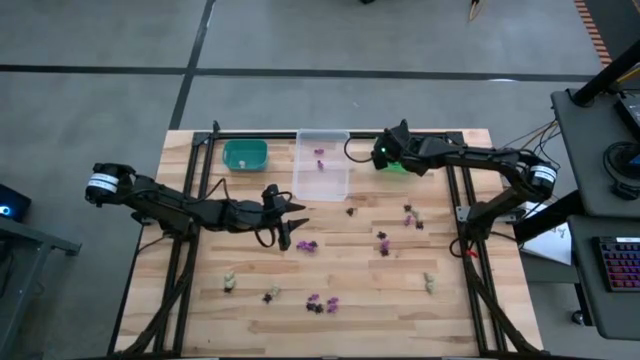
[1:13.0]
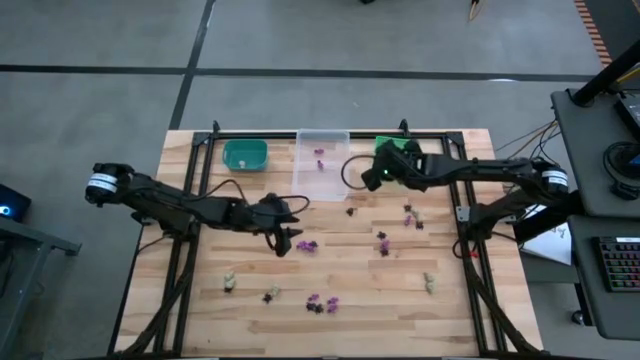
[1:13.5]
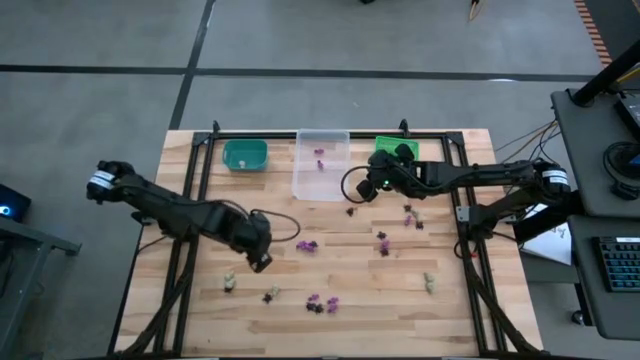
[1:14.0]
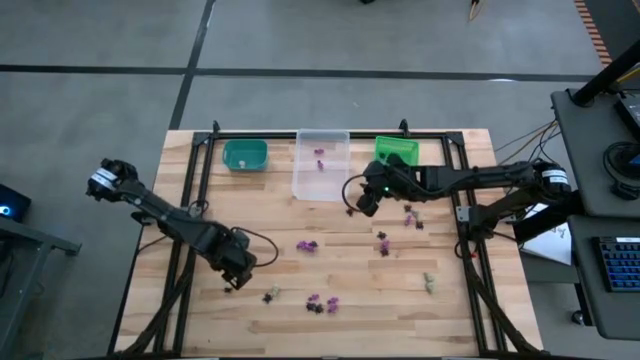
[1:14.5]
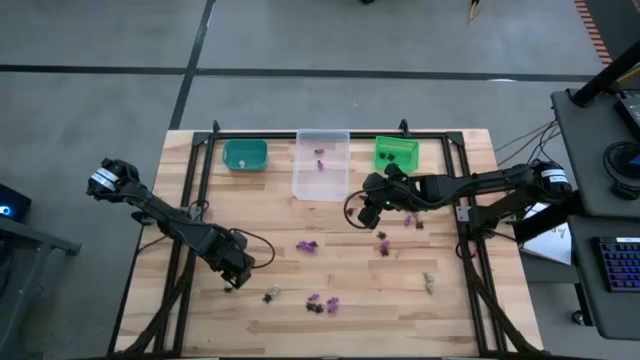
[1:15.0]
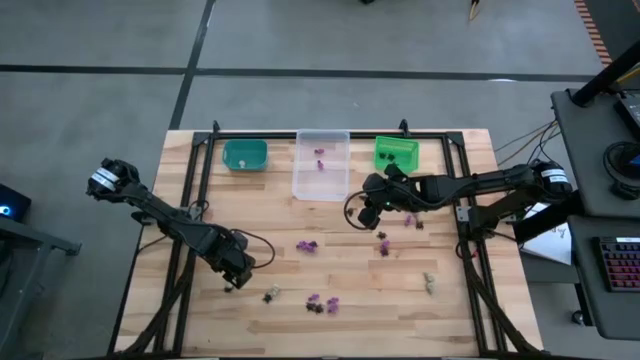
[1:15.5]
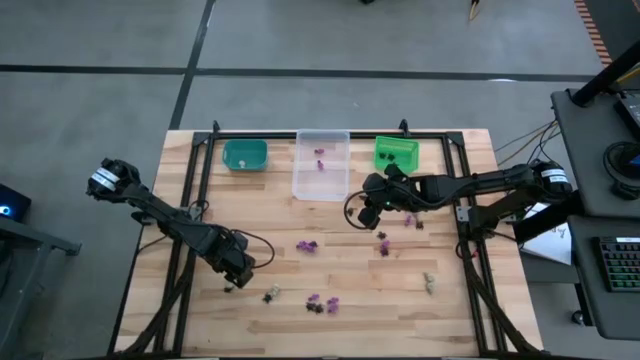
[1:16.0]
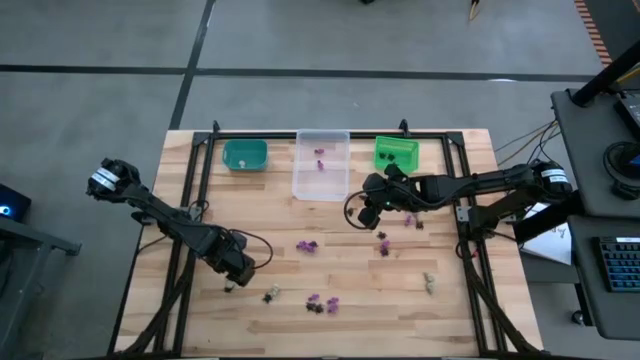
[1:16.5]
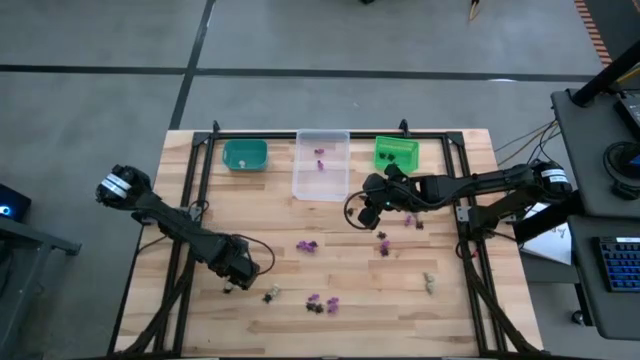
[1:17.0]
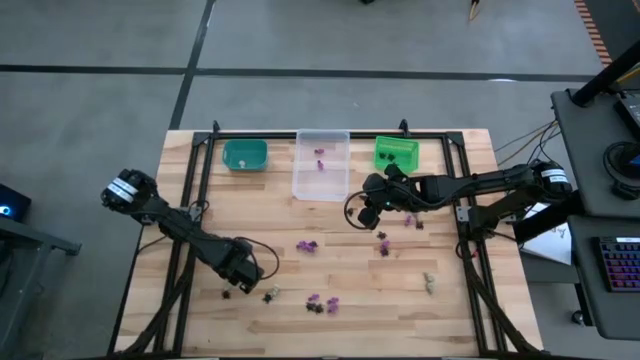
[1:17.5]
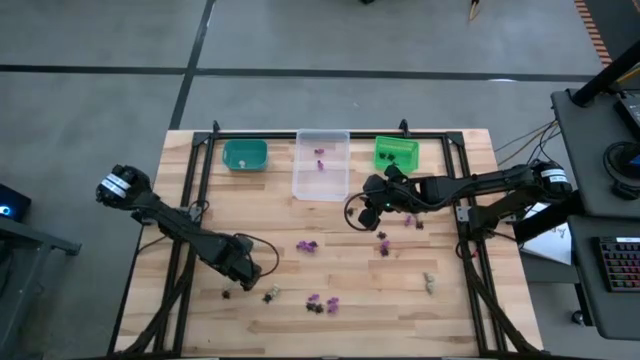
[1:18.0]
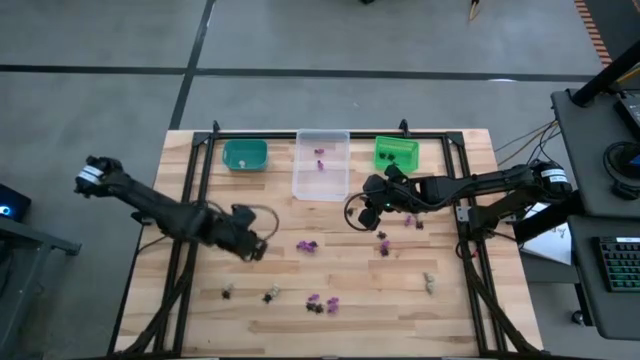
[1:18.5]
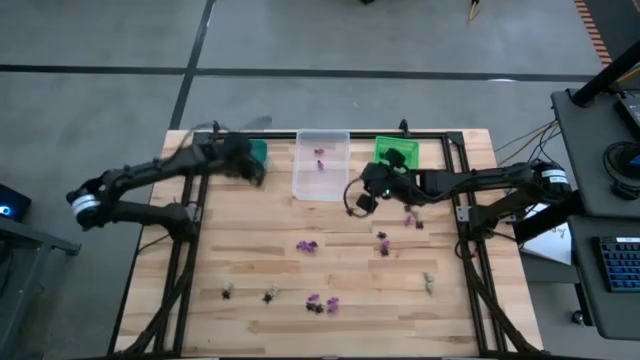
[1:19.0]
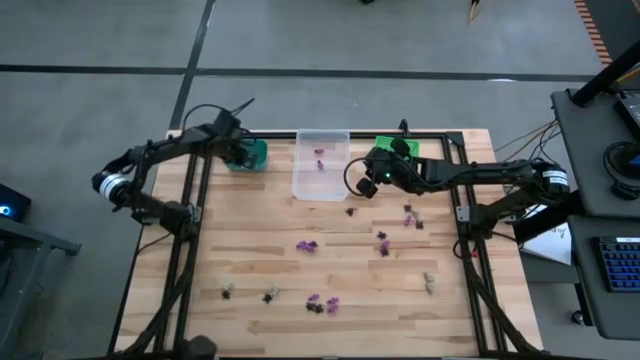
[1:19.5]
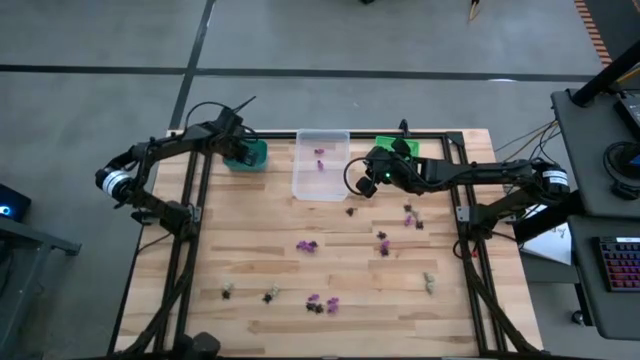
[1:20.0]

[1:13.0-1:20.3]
Task: Sort Halloween decoration
Put the white skull toy into the light blue bin

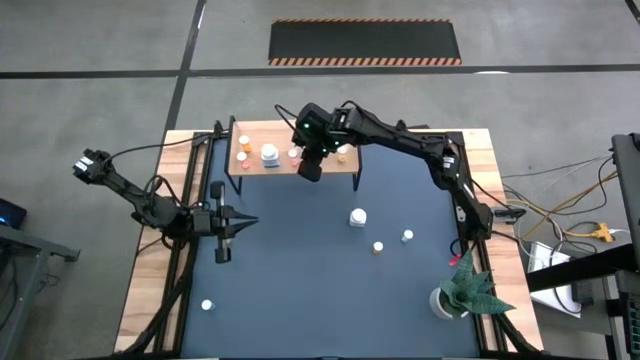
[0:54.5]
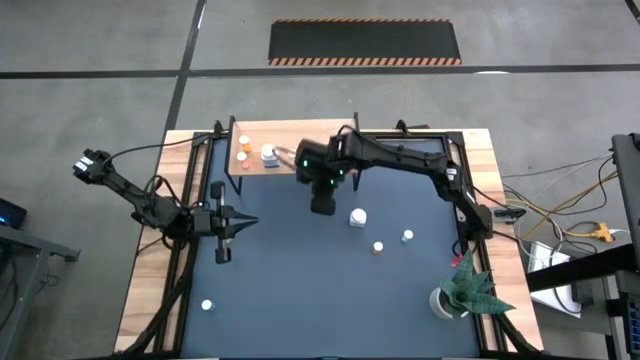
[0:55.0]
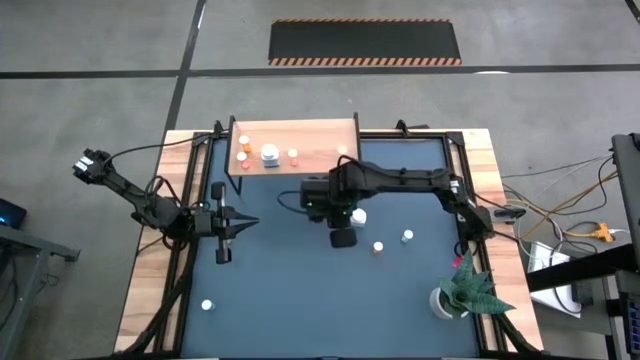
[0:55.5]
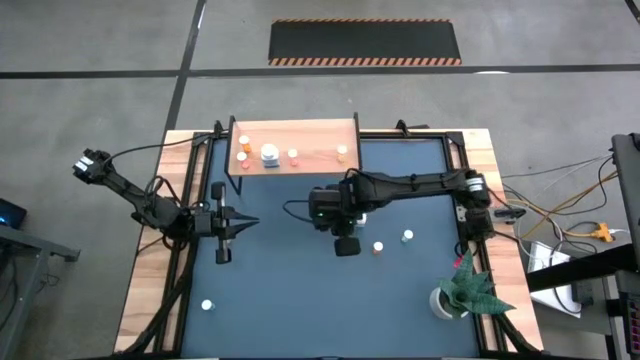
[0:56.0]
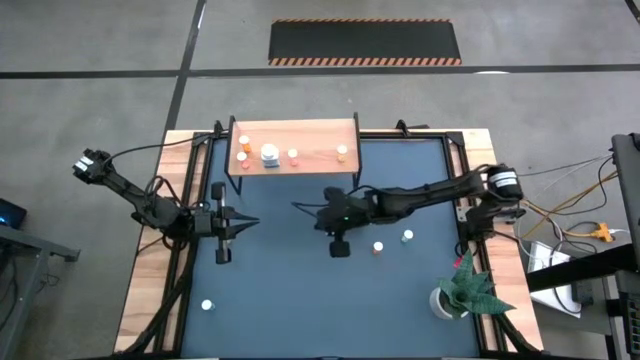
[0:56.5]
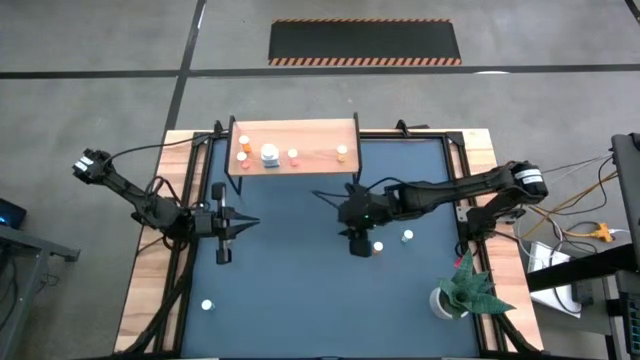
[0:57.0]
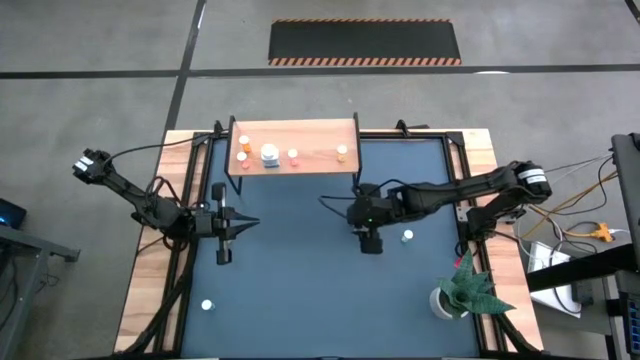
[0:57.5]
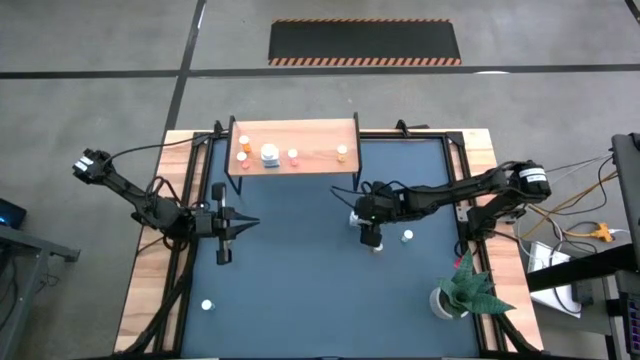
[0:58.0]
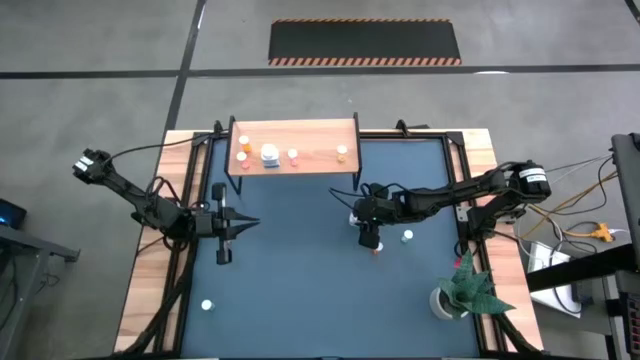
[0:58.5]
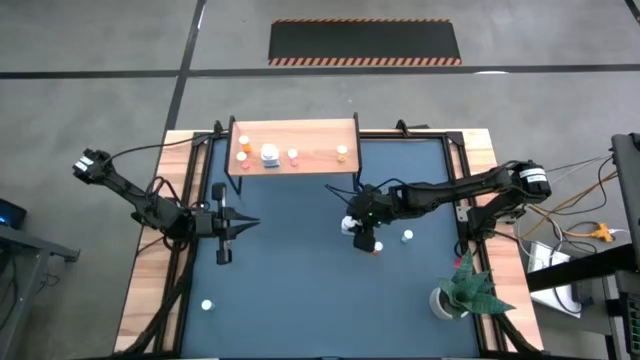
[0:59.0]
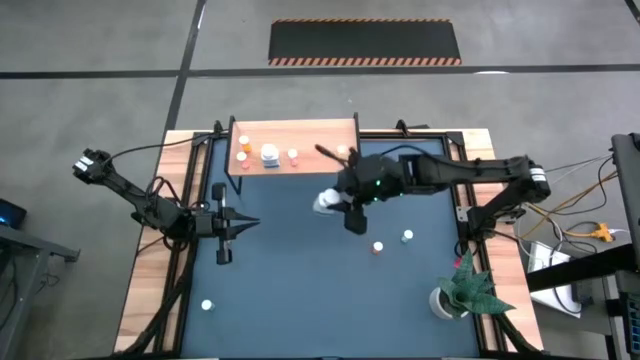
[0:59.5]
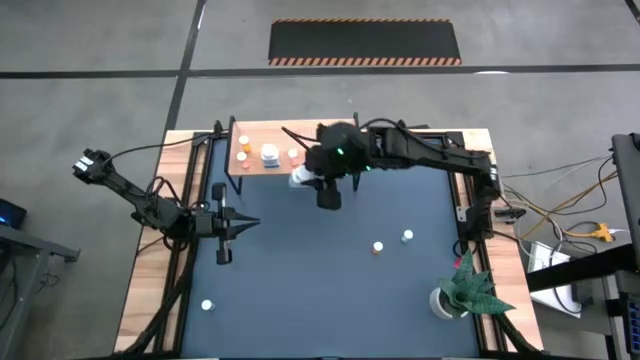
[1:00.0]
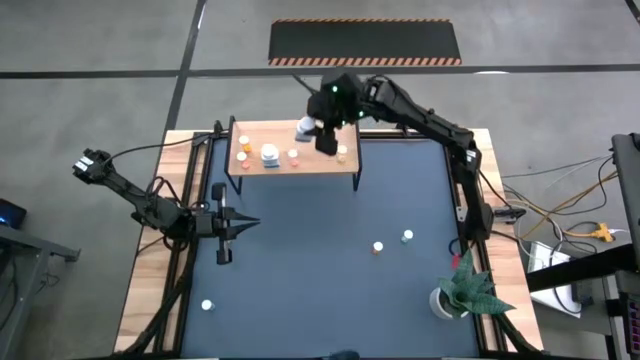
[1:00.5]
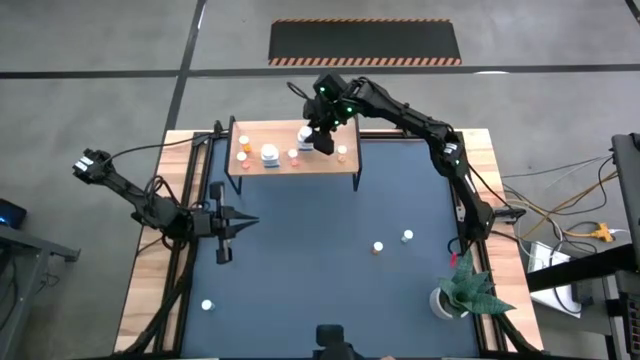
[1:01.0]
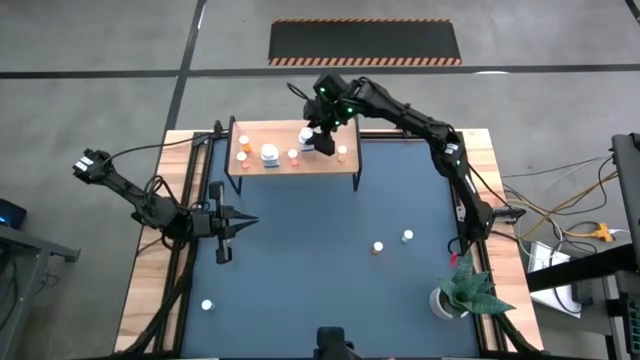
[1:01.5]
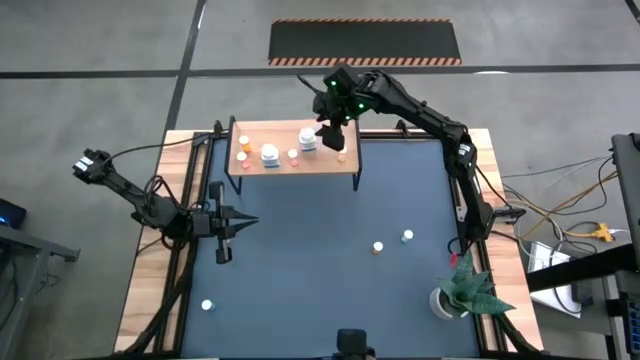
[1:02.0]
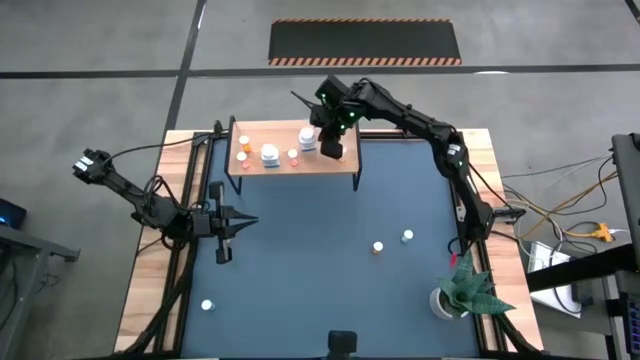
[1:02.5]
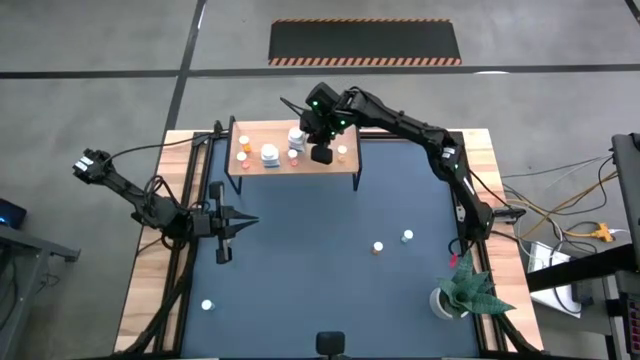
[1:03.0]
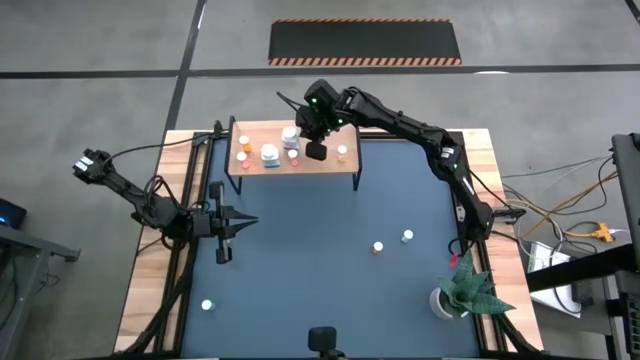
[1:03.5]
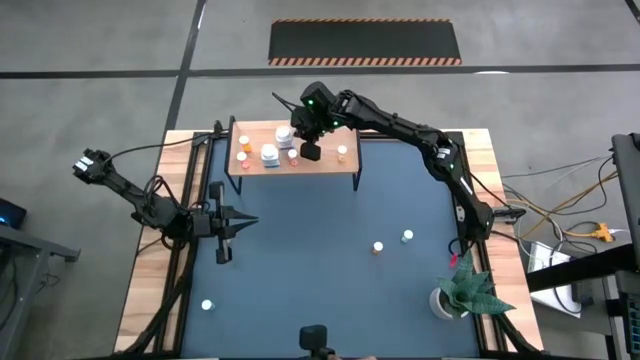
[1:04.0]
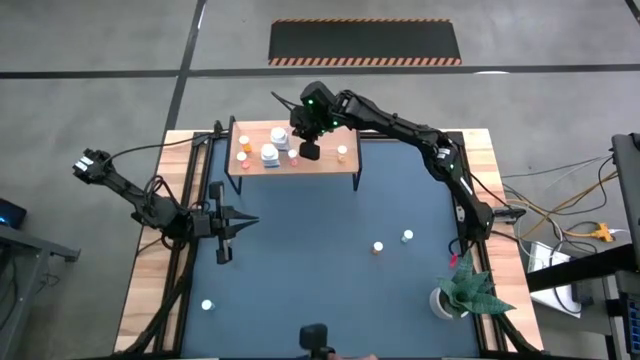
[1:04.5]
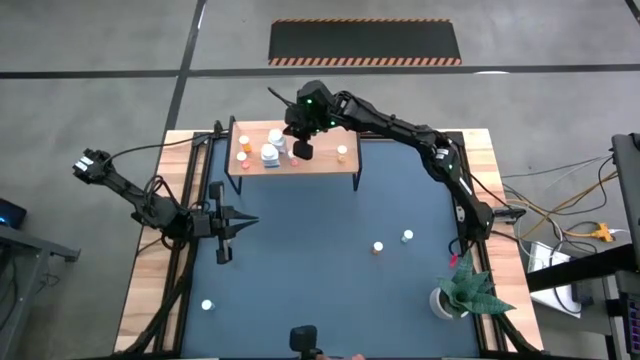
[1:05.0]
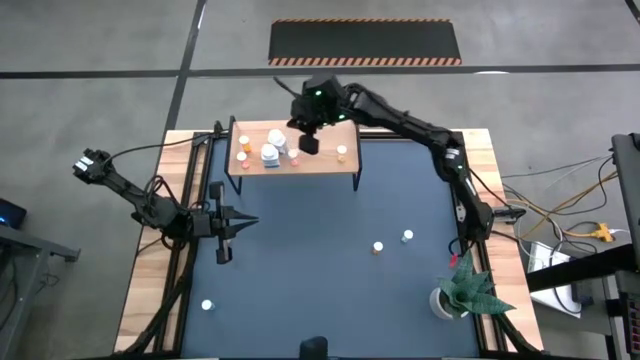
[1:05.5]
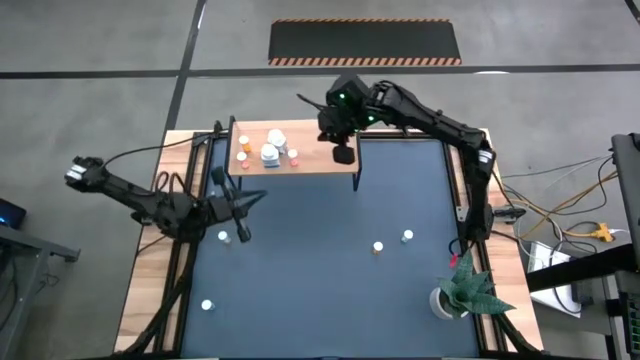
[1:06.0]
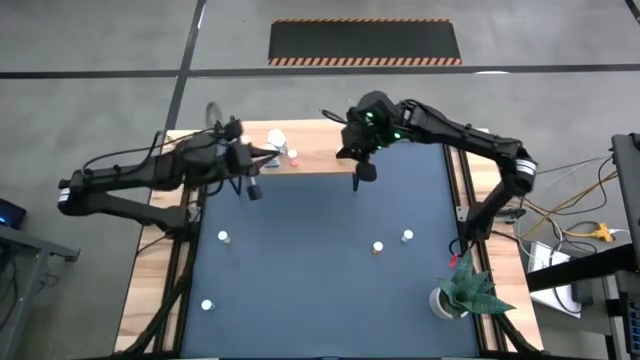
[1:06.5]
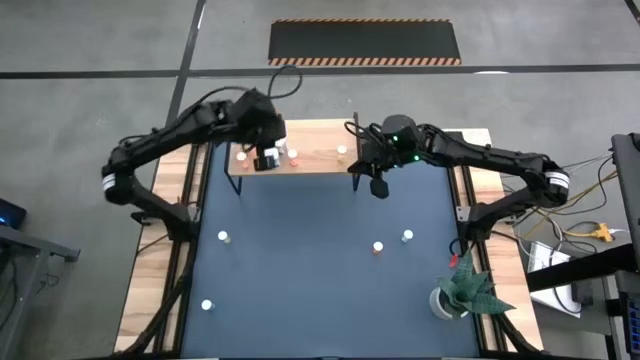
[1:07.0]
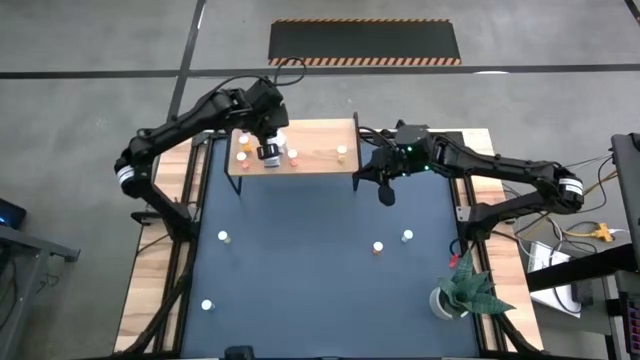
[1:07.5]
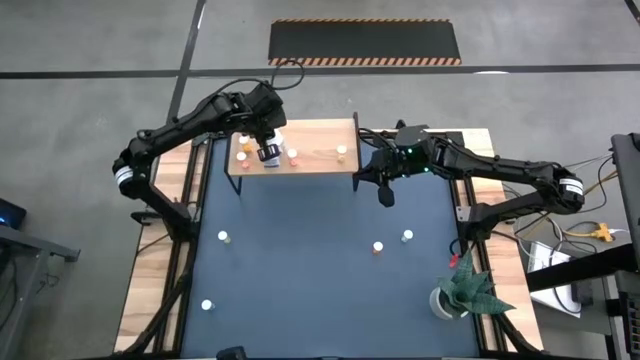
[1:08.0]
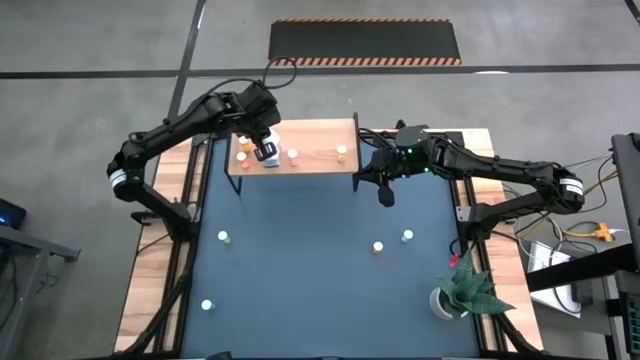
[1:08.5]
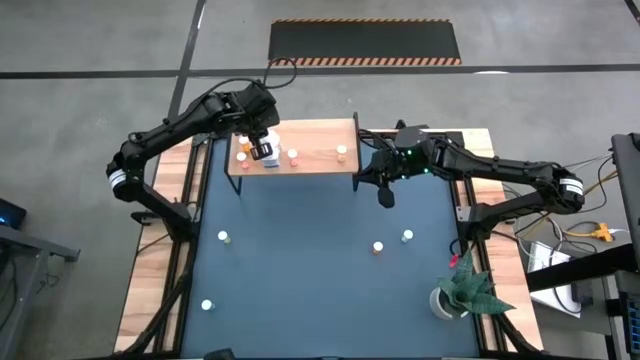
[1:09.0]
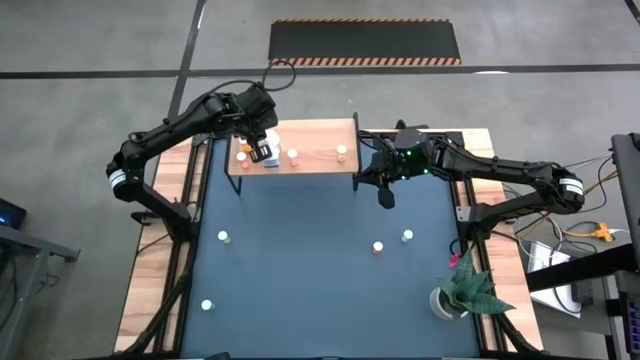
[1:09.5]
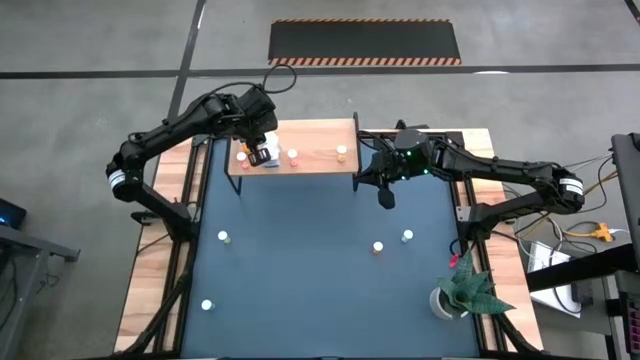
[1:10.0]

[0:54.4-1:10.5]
Task: Pick and place medicine bottles onto shelf by color
Put the white pill bottle on the shelf
